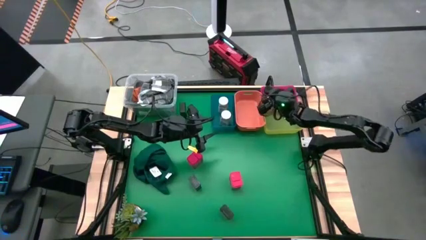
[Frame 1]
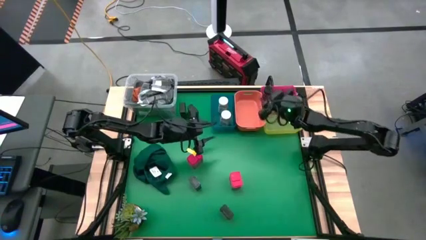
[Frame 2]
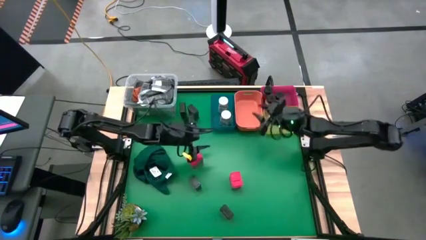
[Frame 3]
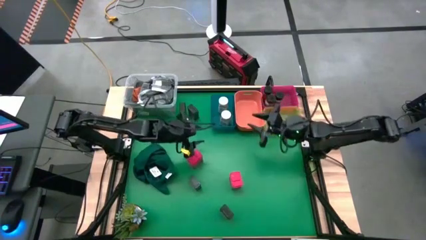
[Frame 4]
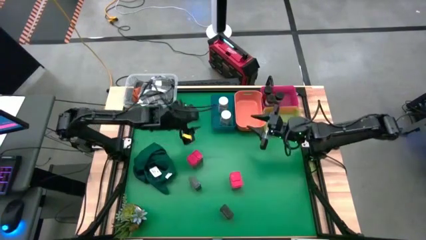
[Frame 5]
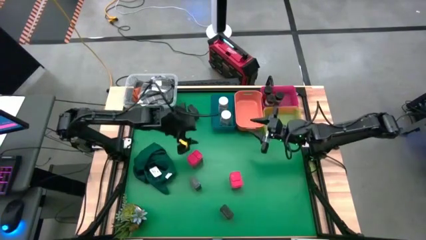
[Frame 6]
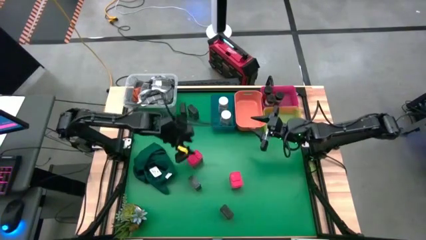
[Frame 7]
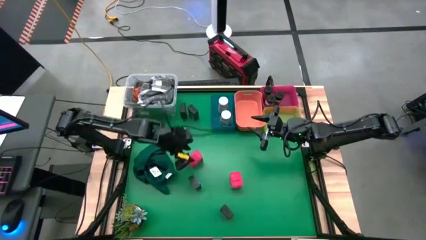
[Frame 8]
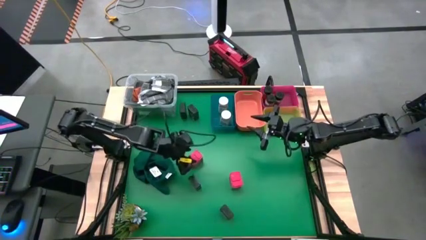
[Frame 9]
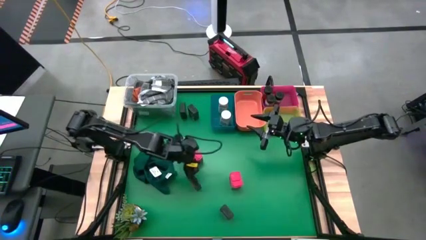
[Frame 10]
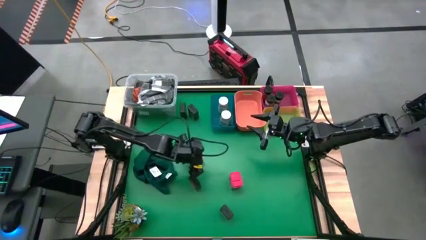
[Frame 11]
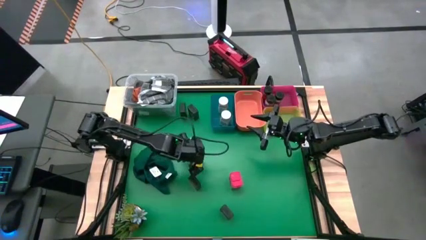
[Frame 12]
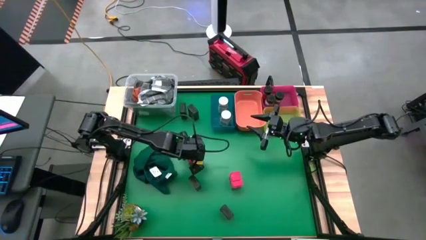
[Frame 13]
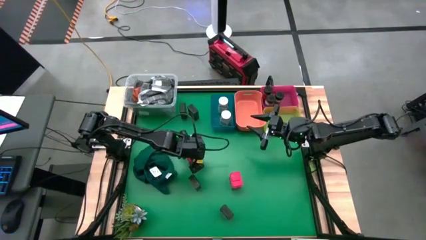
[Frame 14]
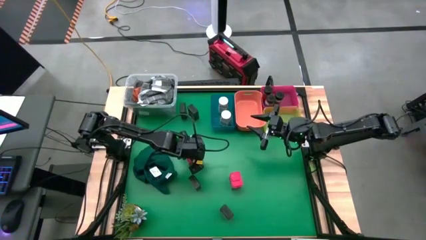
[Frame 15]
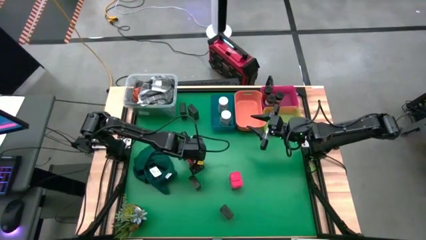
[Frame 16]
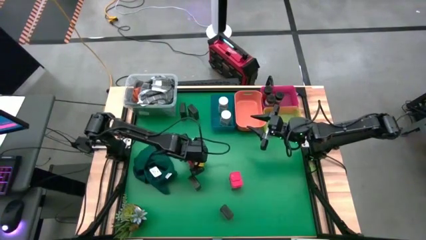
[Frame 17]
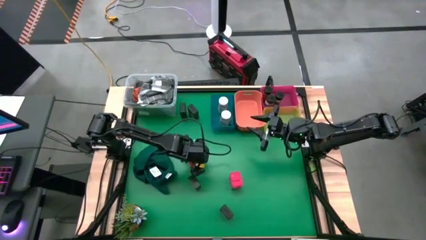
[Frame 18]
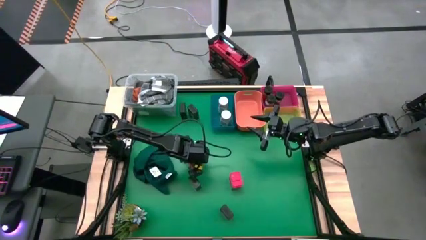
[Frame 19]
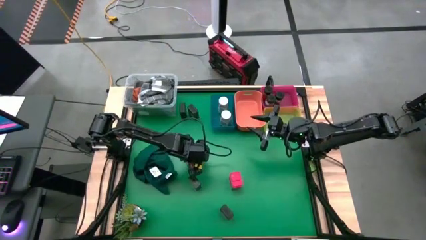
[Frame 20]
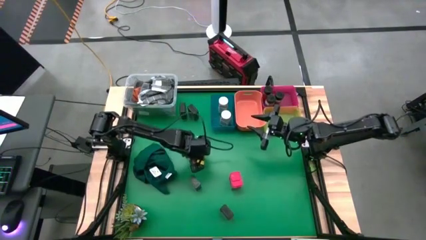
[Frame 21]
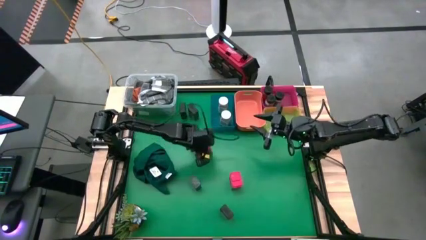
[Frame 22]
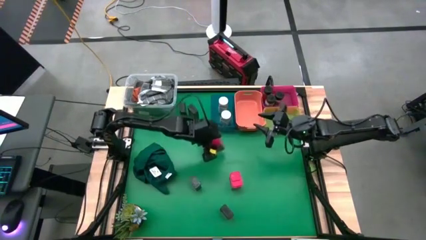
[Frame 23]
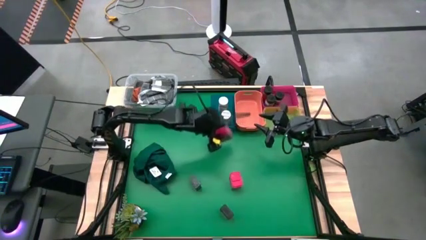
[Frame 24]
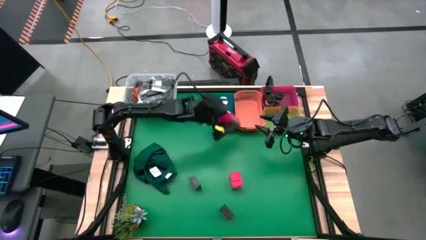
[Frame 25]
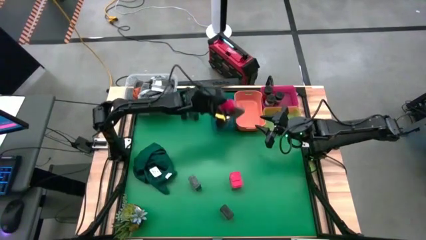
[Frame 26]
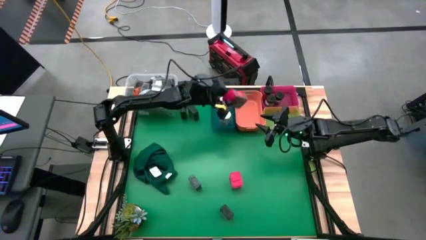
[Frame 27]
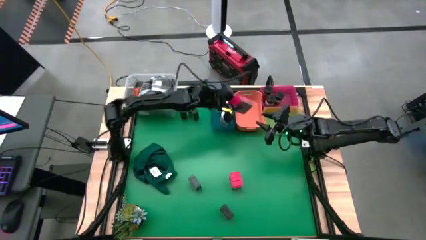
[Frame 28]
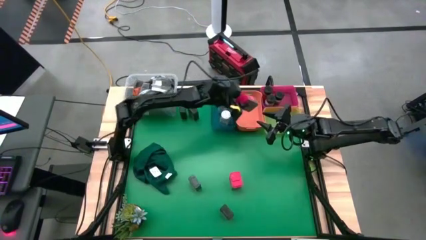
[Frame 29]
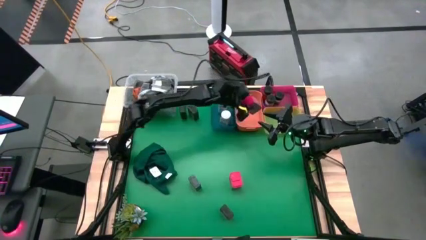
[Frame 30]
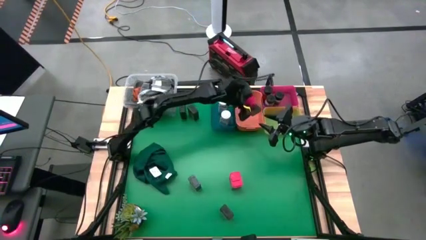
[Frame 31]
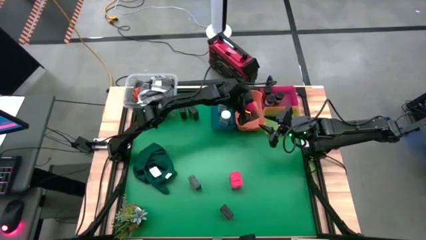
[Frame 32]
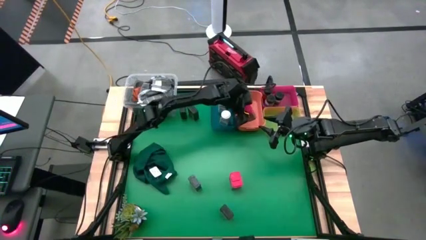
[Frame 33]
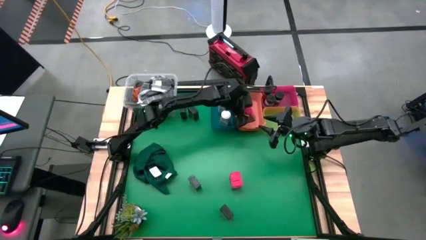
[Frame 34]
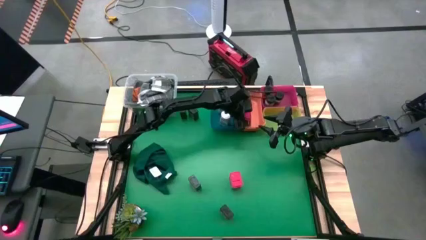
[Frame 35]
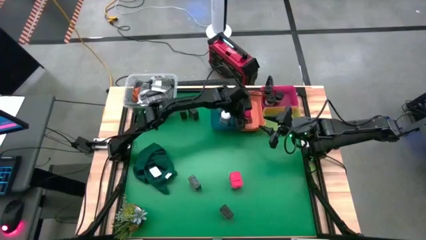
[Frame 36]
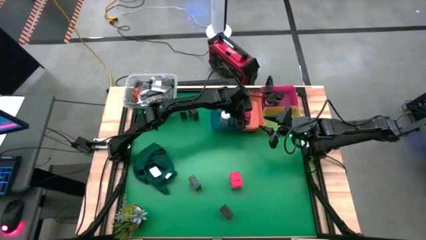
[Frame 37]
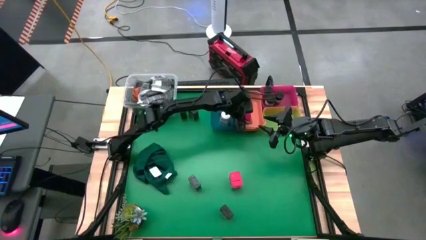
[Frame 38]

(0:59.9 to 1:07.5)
Task: Sort spices by type
Put the top red seasoning can into the orange bin

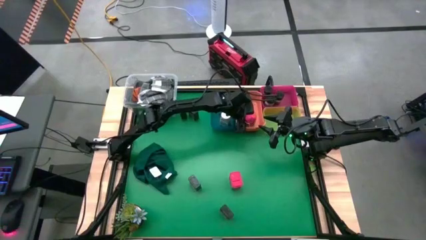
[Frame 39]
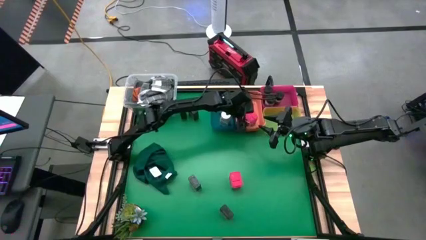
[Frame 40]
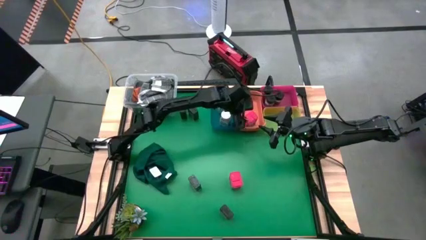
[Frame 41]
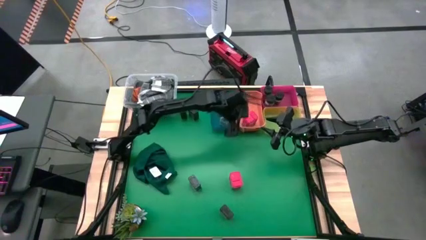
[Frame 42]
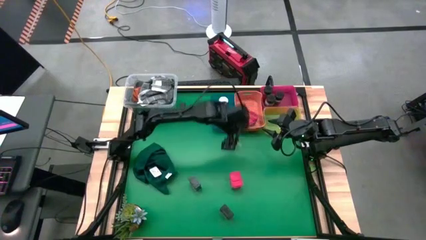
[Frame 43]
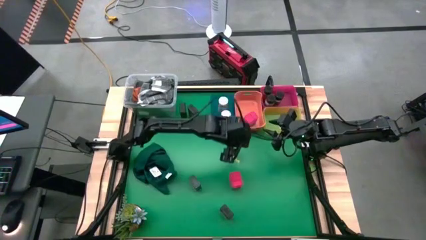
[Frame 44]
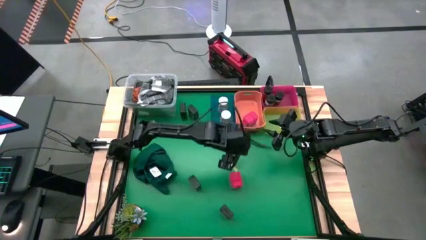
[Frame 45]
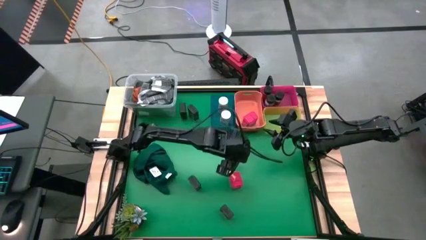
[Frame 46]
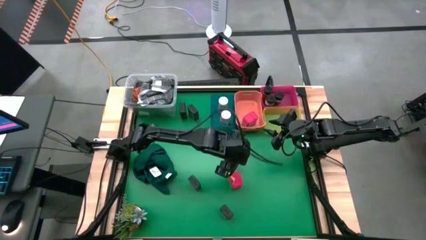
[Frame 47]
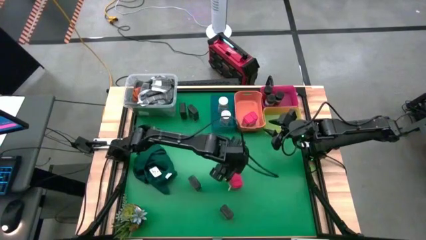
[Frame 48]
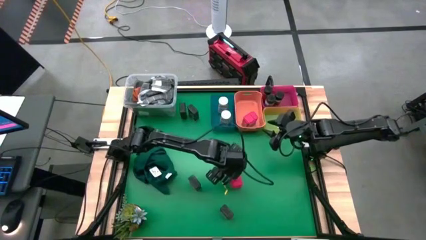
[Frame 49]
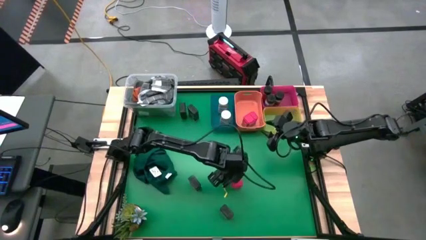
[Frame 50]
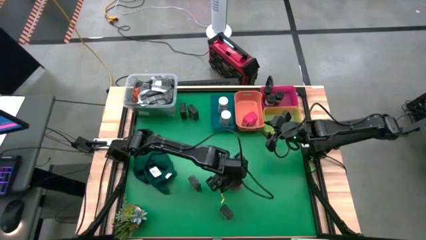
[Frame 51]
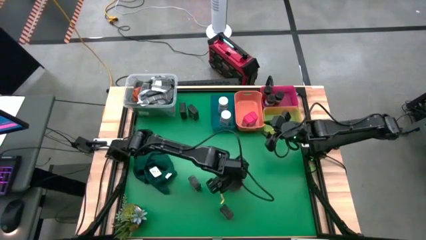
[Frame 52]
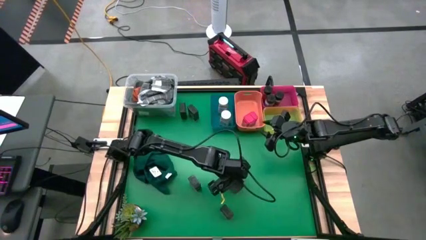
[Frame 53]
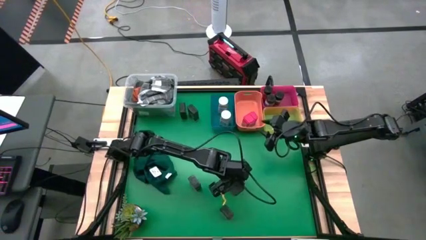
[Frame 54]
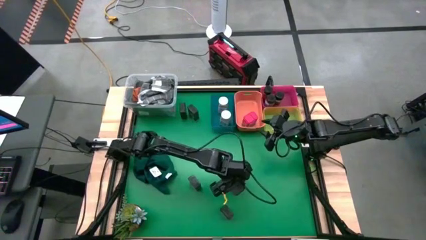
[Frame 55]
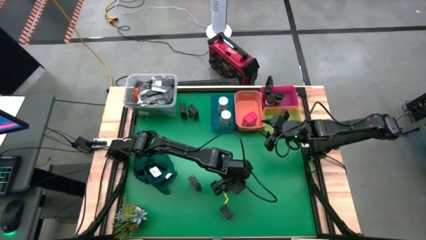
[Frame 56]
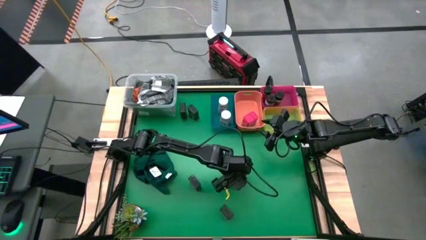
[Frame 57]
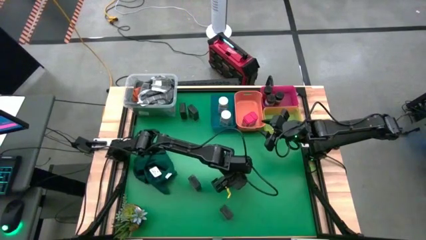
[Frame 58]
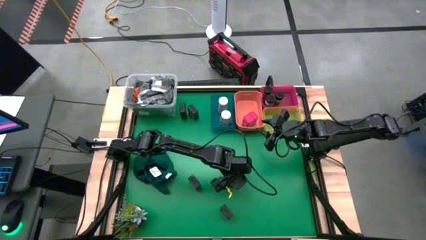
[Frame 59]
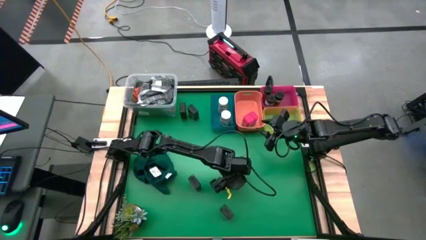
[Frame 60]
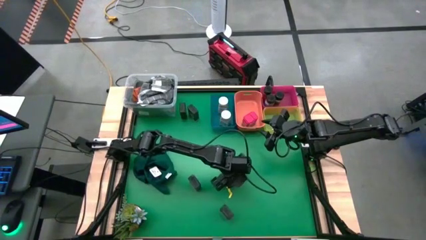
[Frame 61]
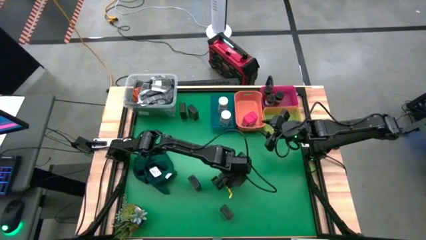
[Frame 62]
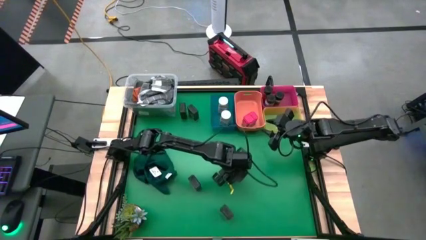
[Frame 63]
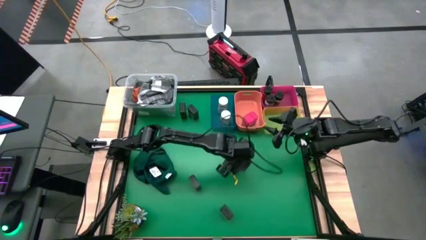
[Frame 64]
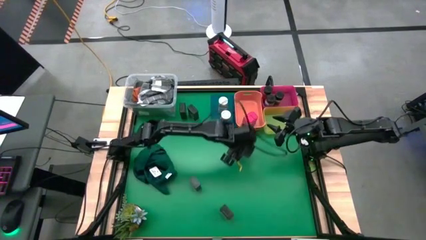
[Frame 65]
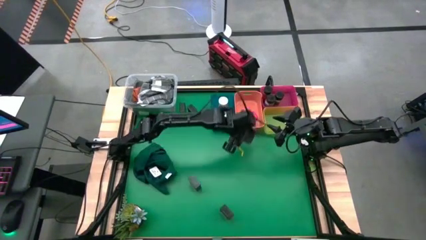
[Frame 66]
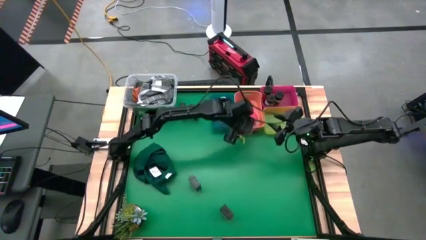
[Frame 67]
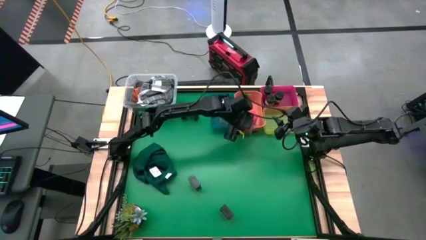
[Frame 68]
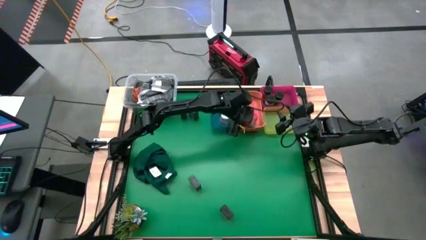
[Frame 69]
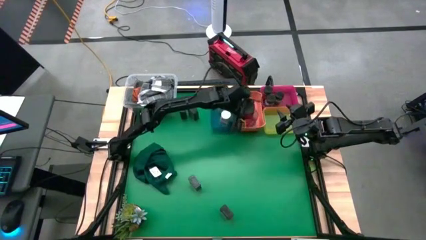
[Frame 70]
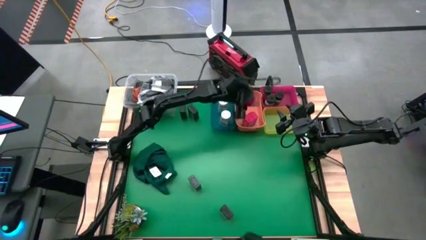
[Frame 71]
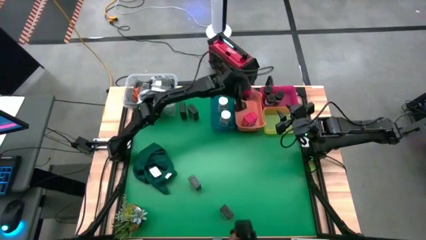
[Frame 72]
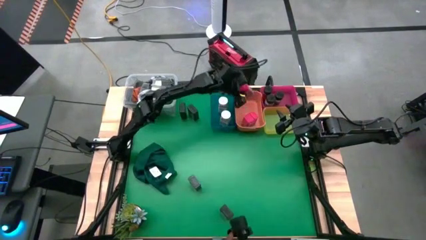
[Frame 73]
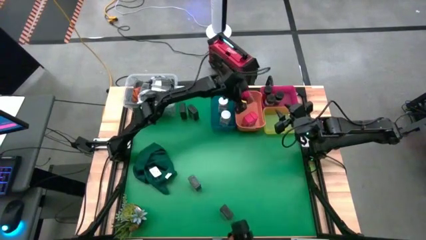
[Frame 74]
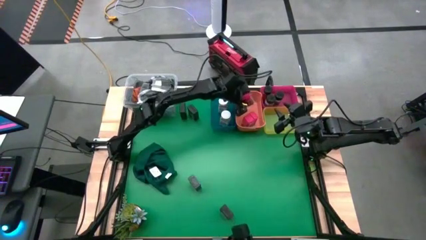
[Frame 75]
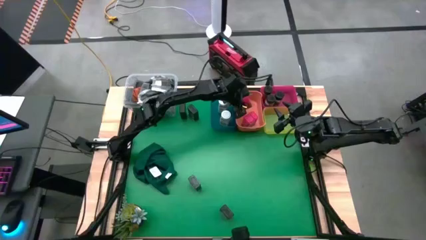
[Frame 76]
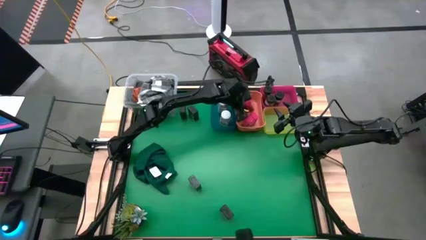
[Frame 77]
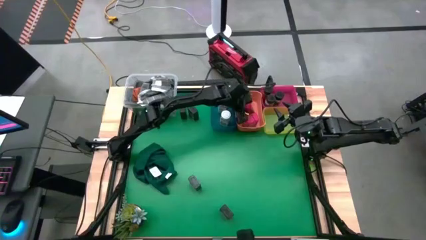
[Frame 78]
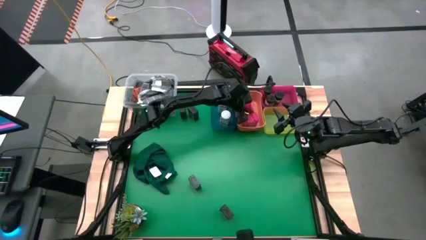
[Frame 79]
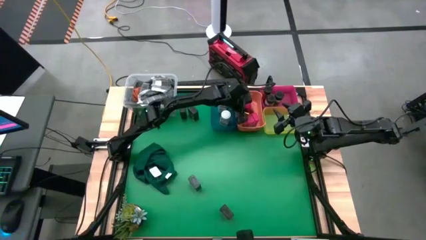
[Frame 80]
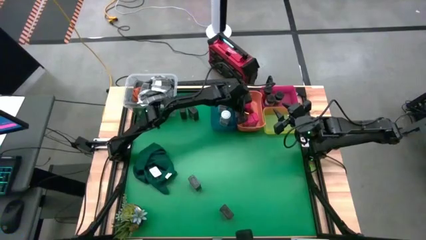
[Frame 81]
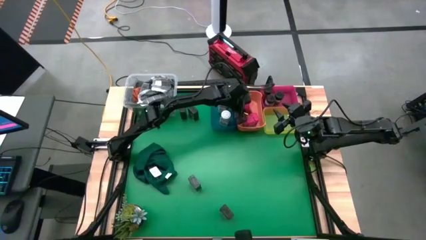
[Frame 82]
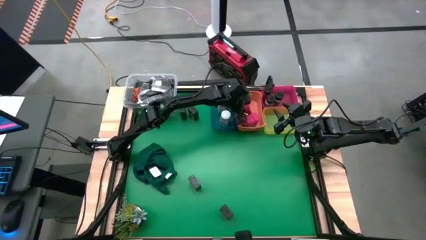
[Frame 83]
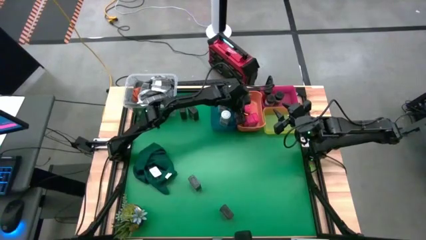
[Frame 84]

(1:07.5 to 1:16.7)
Put the red seasoning can into the orange bin
